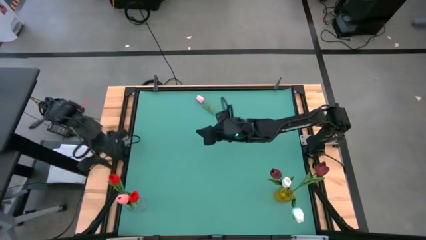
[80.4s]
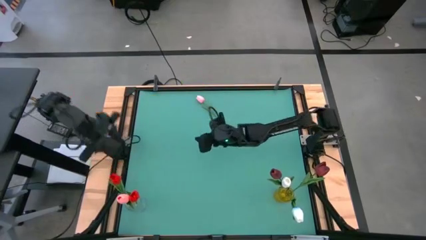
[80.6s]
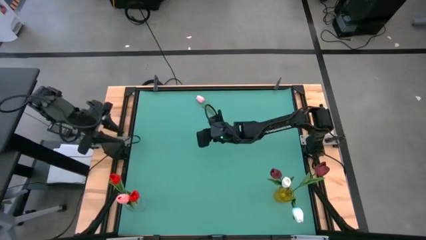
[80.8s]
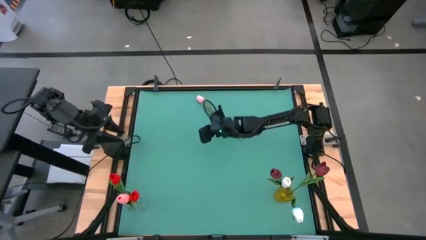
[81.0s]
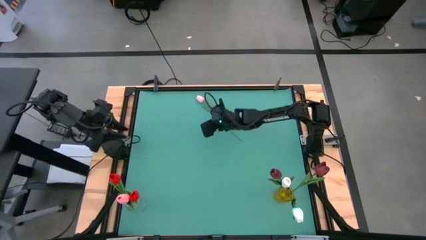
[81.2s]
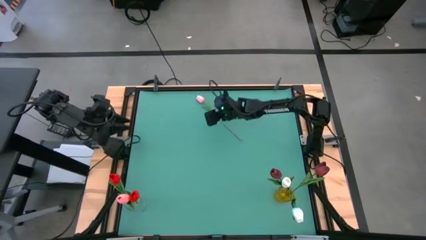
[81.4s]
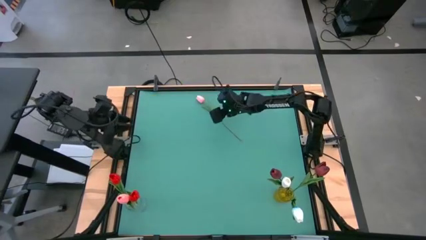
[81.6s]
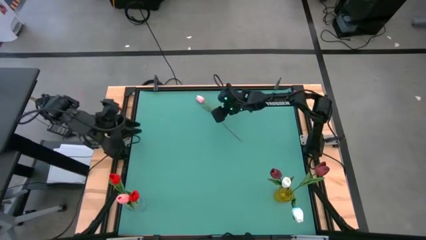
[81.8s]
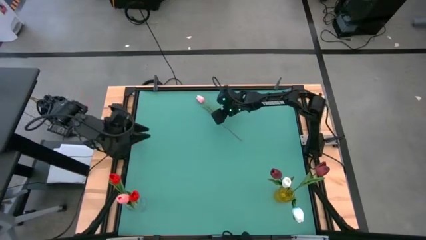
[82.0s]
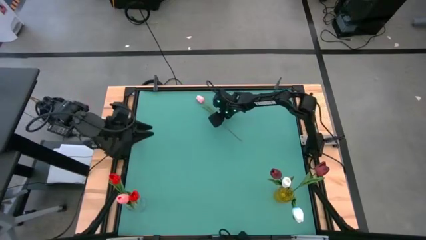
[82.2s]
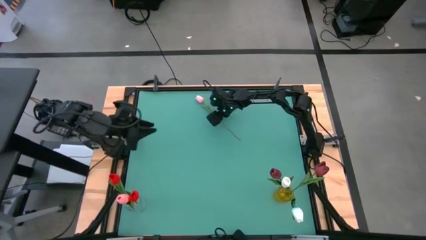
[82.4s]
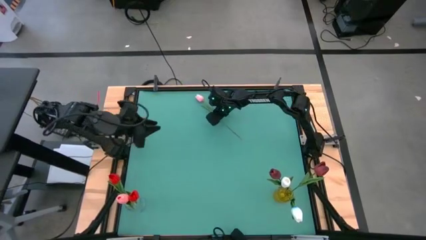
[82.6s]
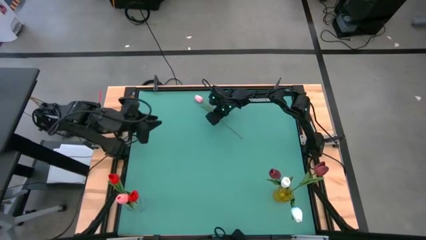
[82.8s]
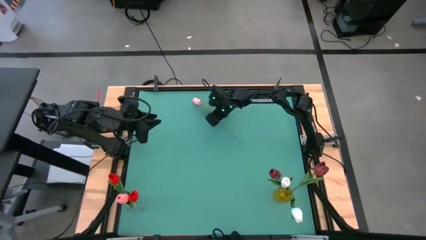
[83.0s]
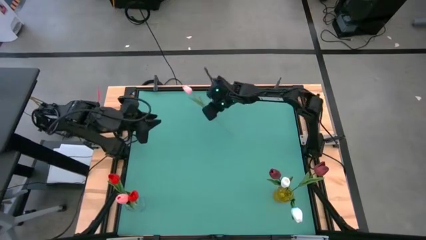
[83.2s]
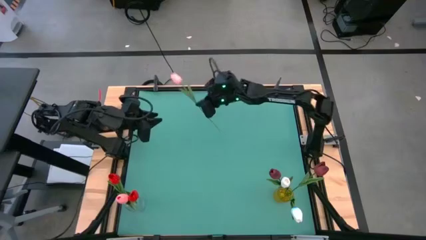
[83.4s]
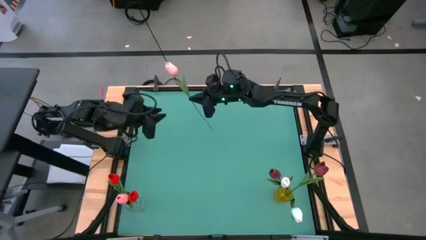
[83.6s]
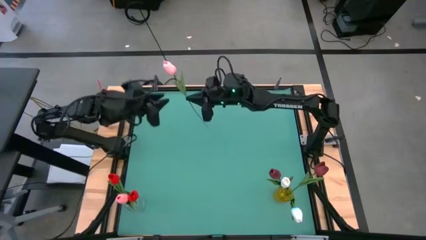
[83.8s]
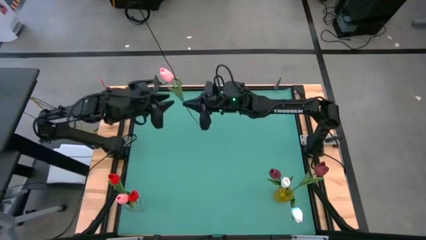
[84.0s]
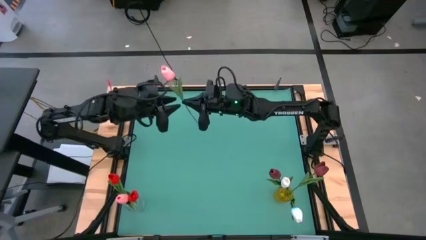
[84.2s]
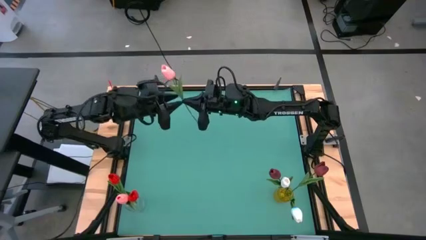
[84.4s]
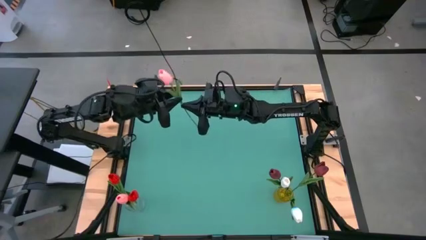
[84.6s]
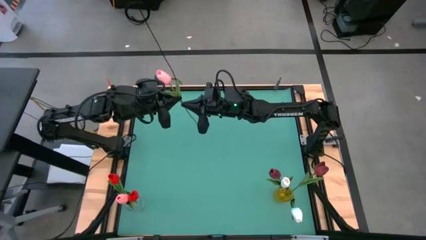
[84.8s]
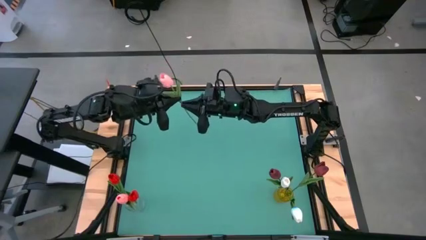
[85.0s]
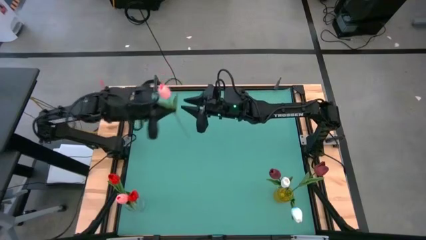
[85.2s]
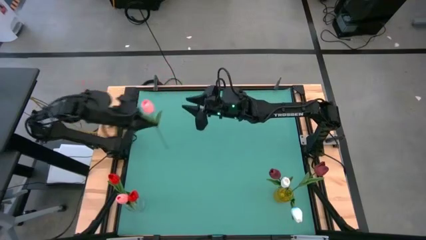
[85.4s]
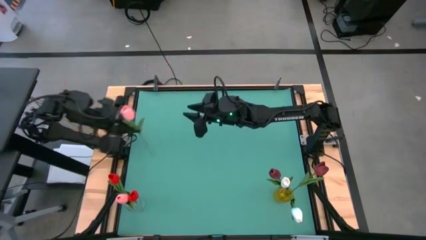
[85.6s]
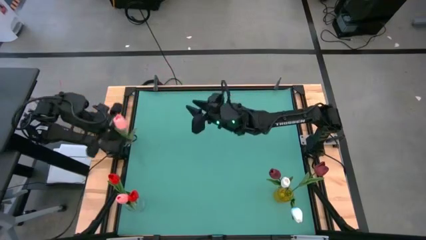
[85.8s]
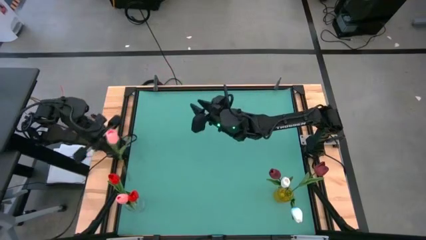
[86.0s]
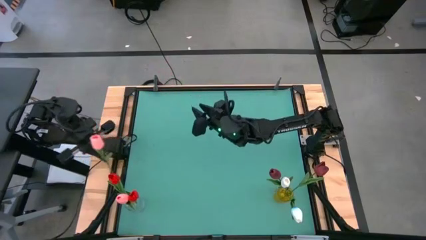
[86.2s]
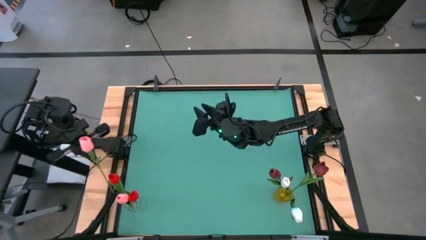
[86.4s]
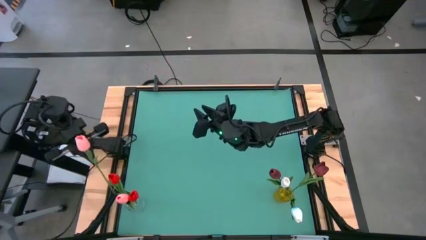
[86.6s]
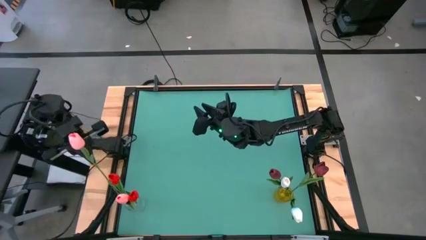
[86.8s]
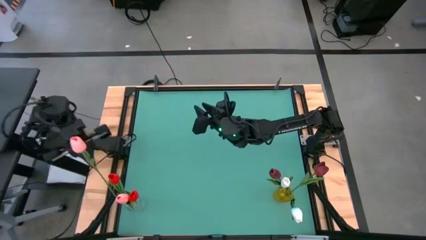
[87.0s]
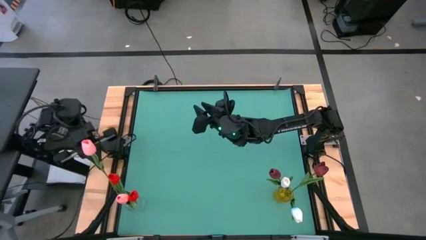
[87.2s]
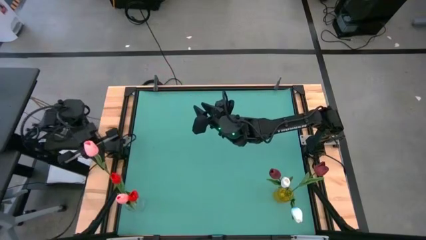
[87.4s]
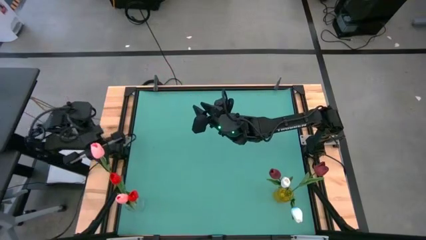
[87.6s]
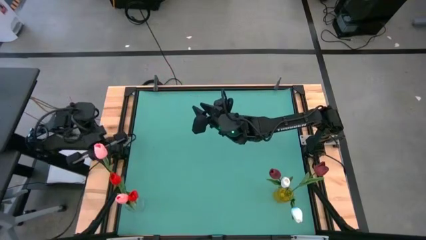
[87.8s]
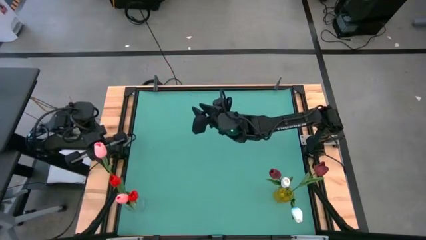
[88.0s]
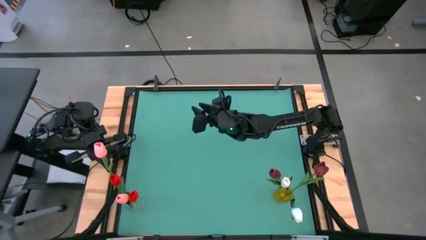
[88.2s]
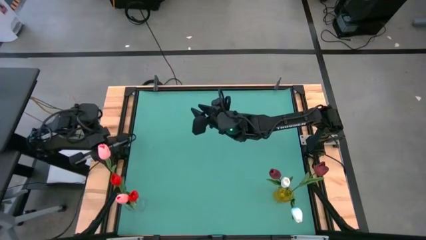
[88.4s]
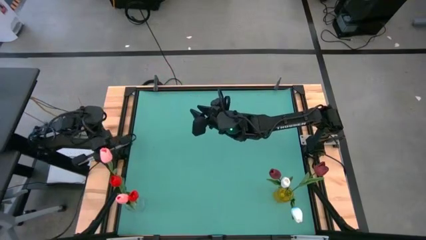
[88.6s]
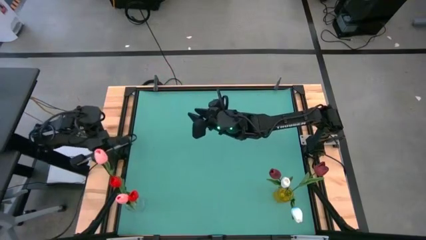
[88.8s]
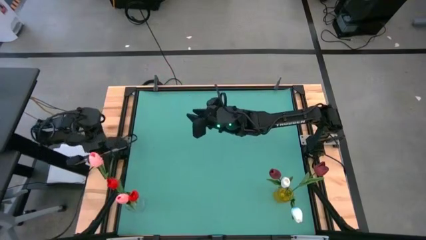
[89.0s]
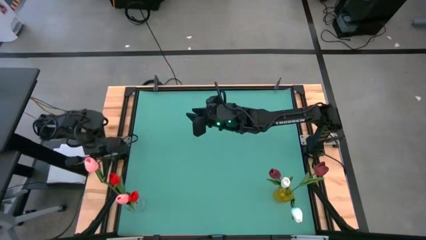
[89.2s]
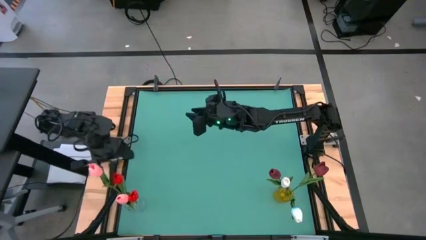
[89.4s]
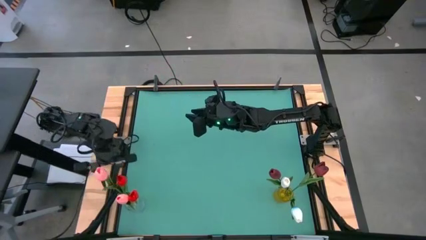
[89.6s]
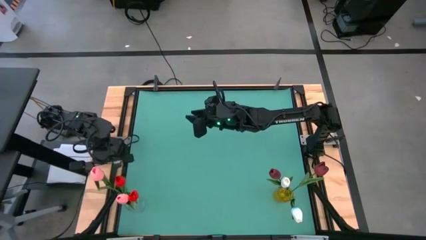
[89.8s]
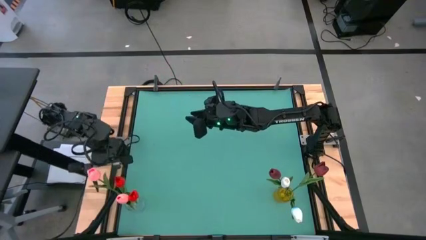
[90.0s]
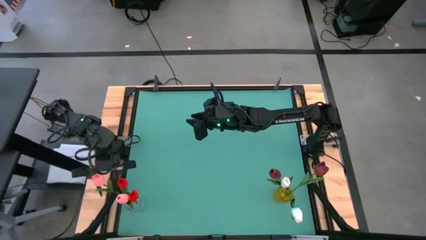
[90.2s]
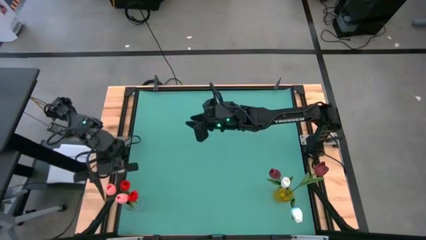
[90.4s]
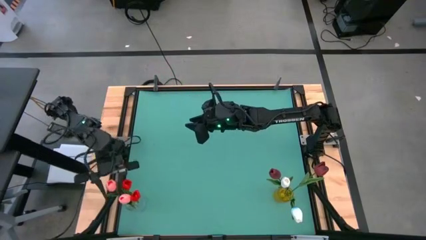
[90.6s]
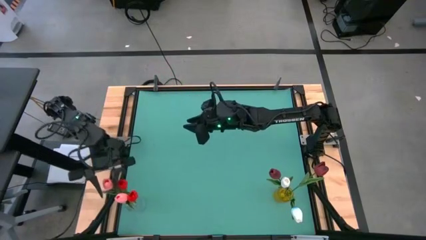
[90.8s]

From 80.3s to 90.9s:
Task: Sort flowers into vase by color
Put the pink tulip into the transparent flower vase

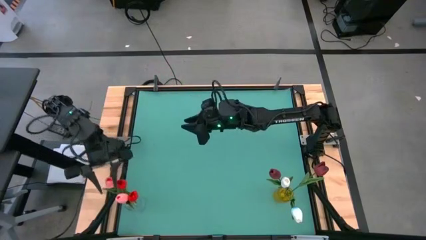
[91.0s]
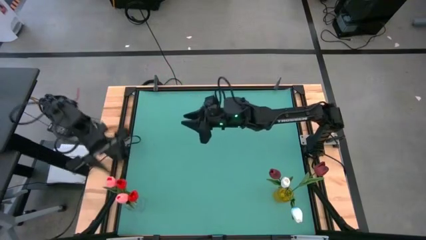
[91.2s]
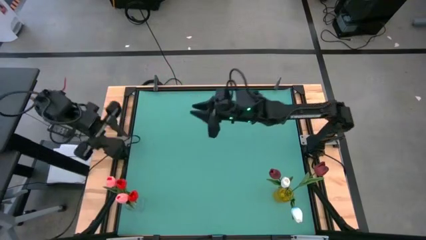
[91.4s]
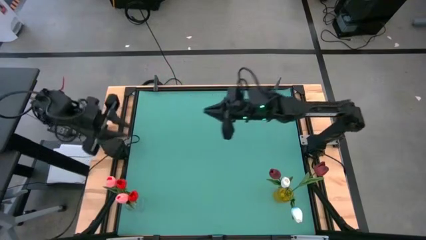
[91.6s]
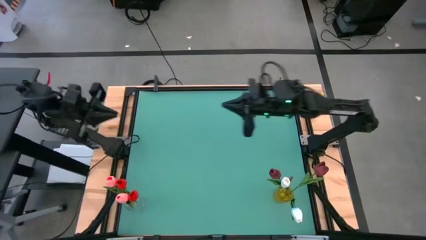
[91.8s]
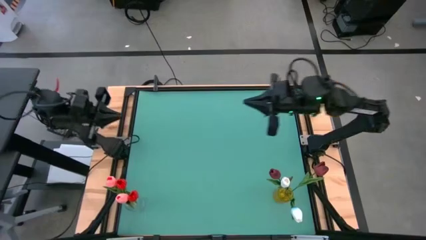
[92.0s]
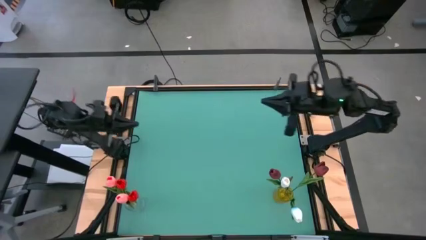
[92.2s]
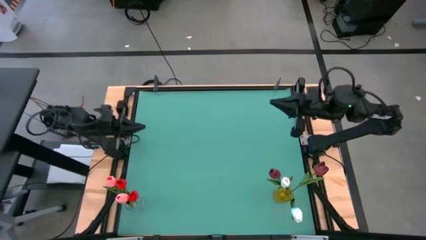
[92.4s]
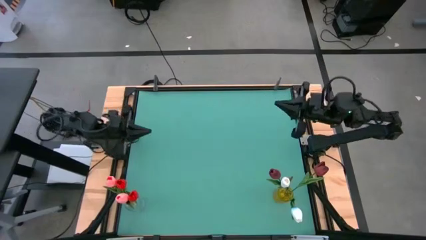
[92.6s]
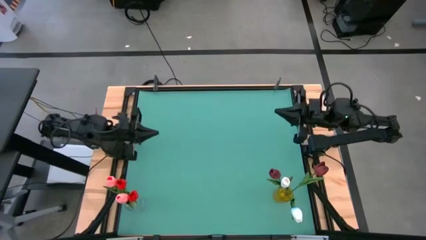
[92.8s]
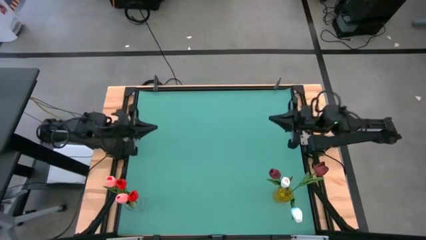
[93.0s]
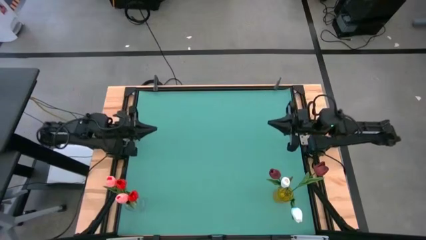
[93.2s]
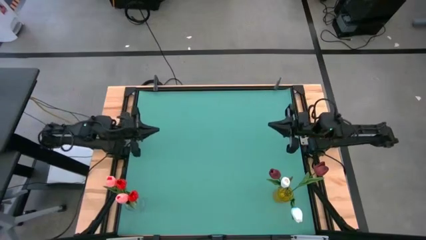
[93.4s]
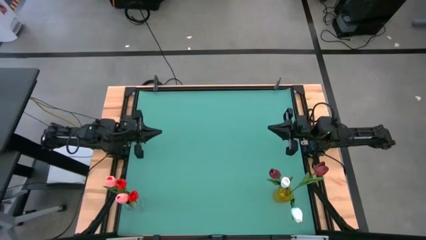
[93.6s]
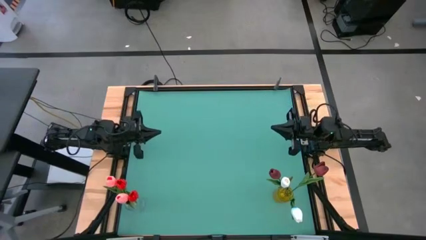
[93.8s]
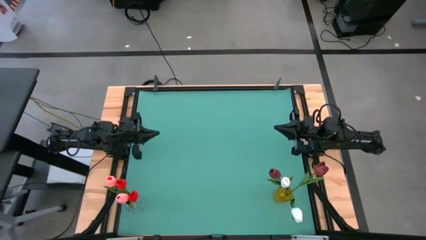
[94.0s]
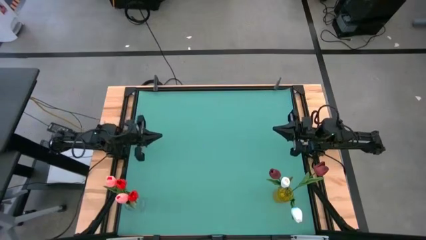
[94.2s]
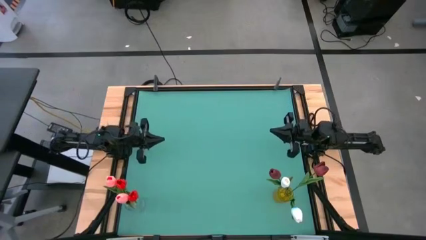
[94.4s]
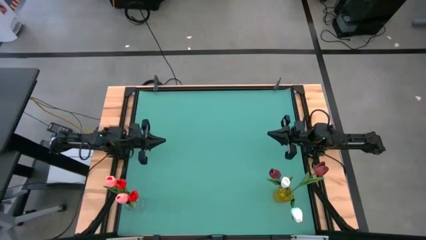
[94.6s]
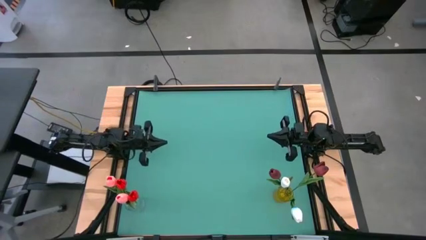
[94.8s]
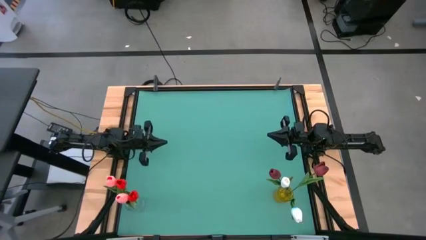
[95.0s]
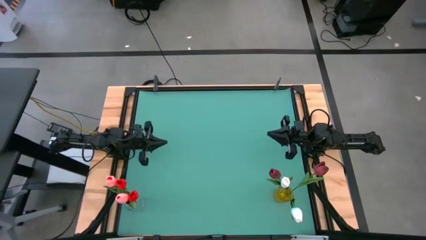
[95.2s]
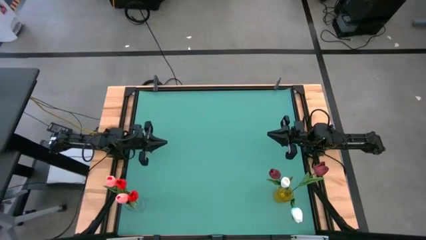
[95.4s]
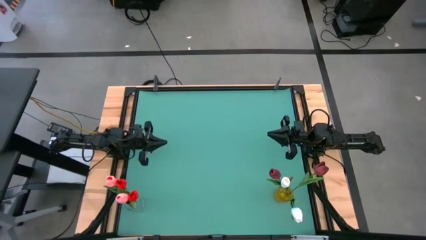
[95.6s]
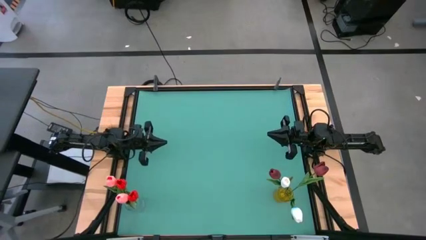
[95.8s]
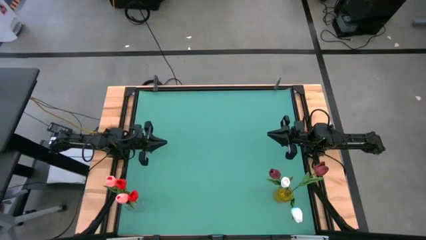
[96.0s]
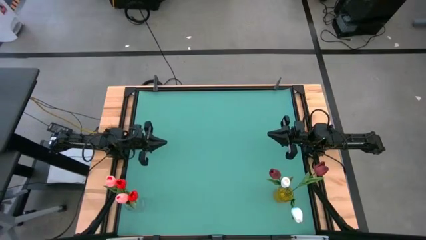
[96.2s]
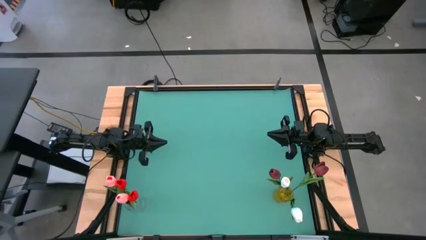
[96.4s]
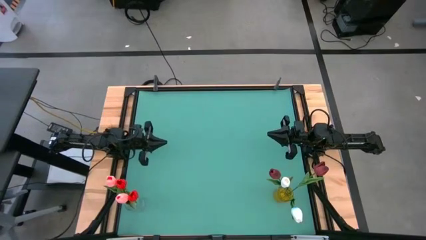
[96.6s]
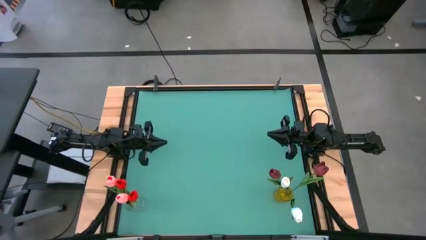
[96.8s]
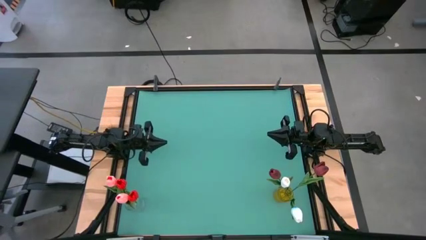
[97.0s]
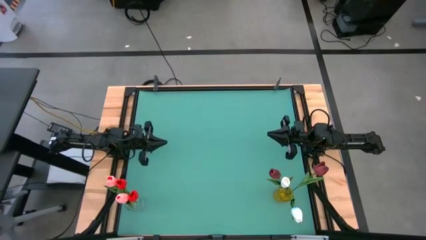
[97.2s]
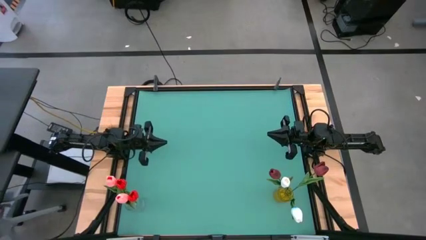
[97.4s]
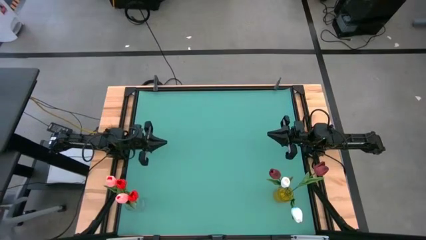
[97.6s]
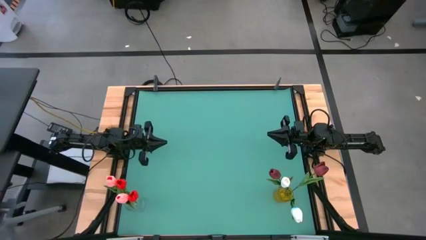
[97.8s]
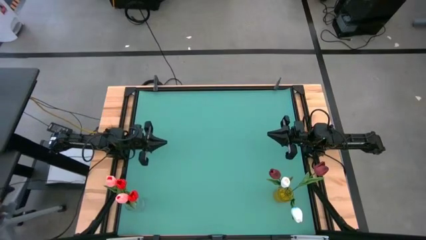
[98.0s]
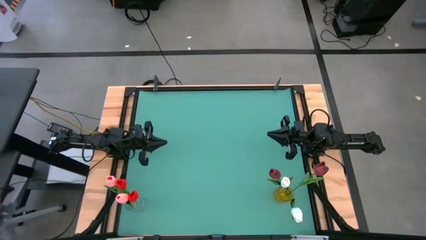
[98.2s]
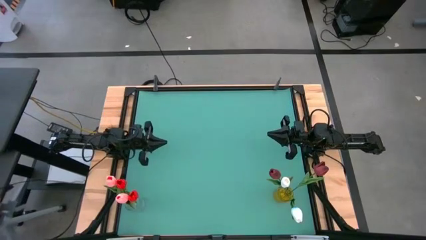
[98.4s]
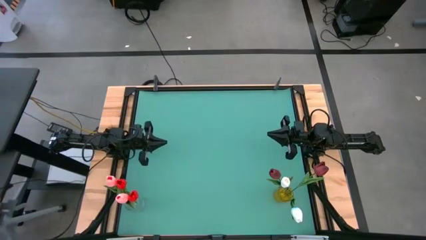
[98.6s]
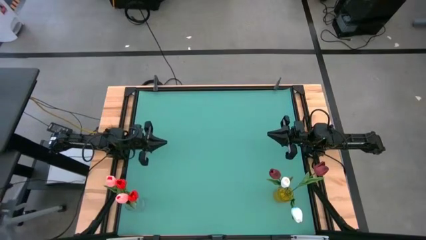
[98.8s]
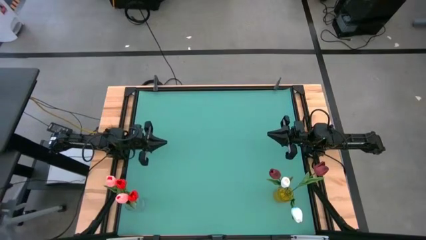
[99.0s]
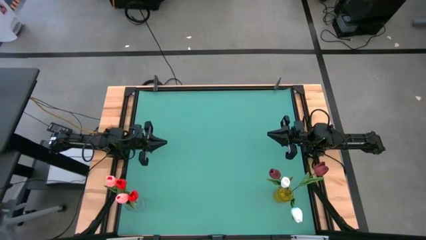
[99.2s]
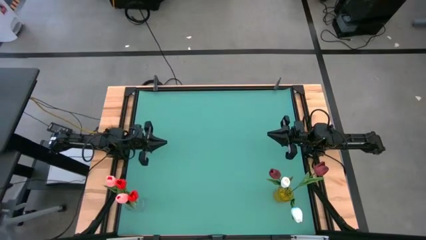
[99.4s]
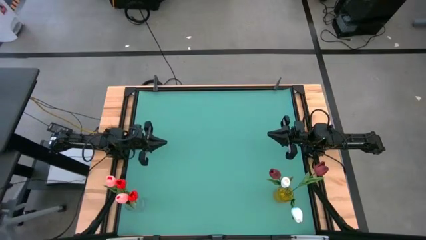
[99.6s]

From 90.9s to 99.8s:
Return to Home Position
